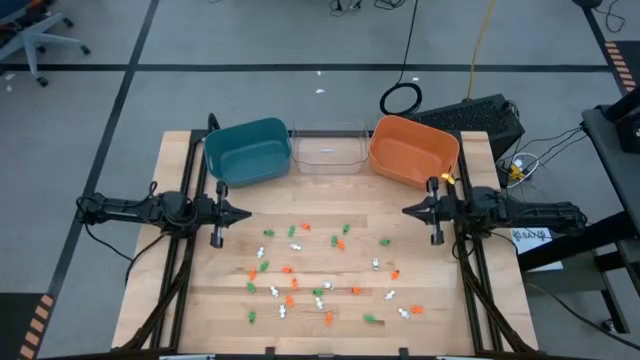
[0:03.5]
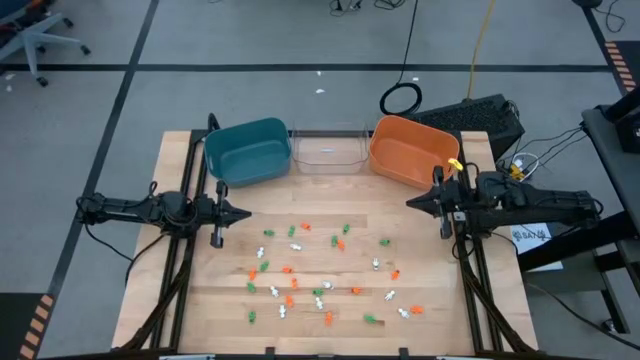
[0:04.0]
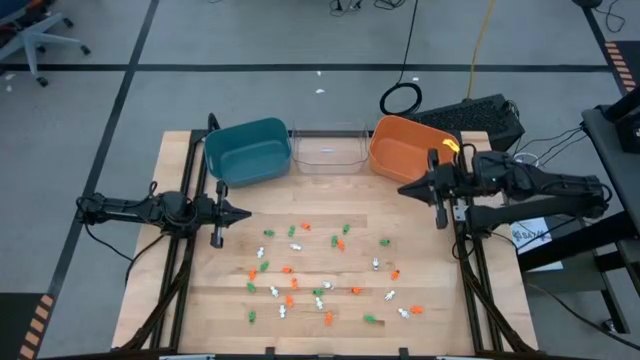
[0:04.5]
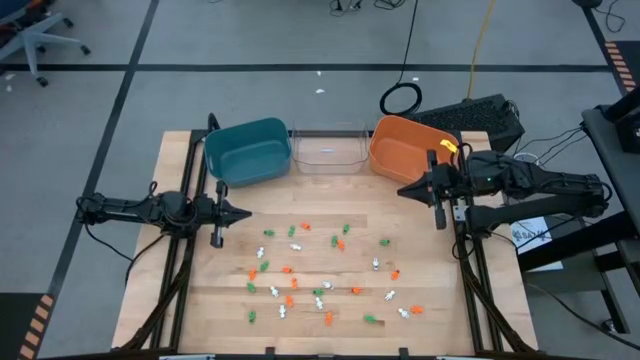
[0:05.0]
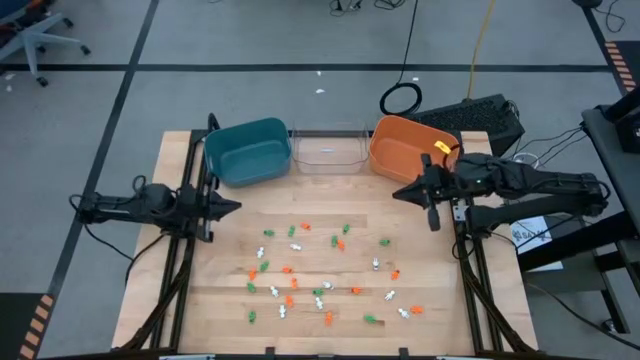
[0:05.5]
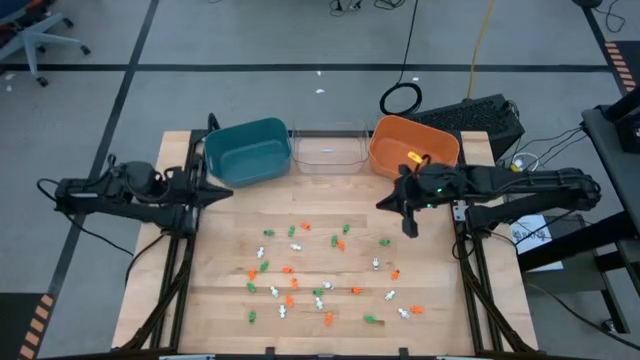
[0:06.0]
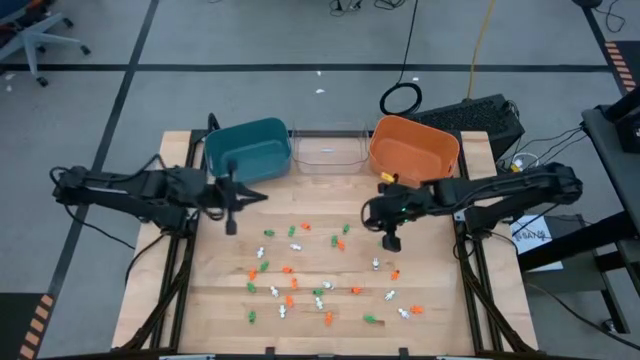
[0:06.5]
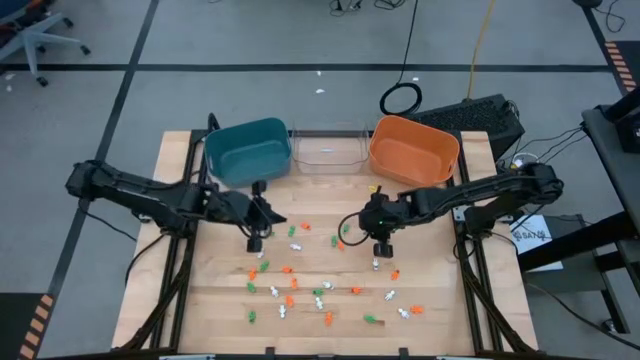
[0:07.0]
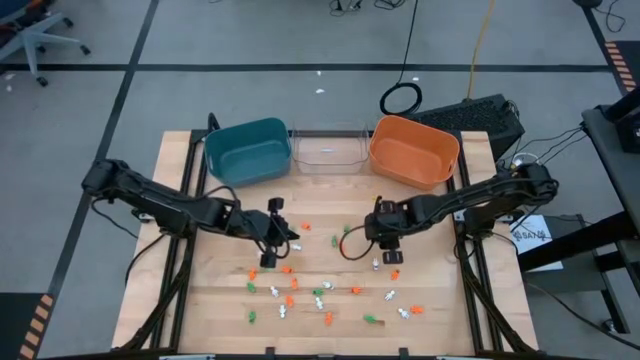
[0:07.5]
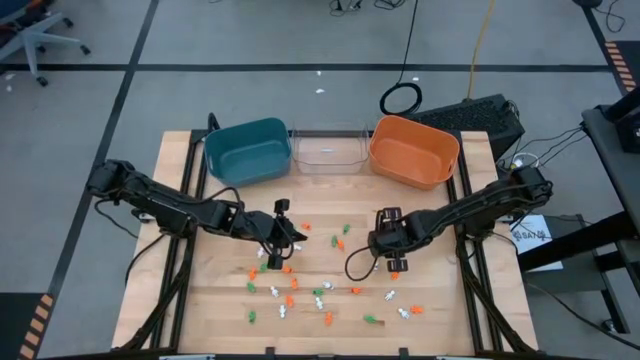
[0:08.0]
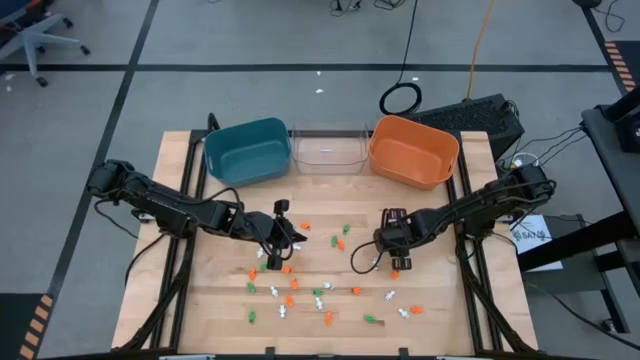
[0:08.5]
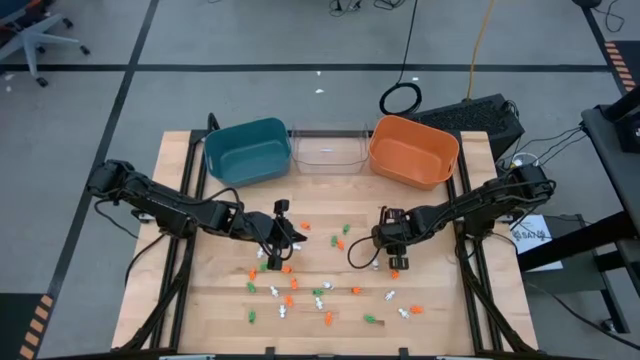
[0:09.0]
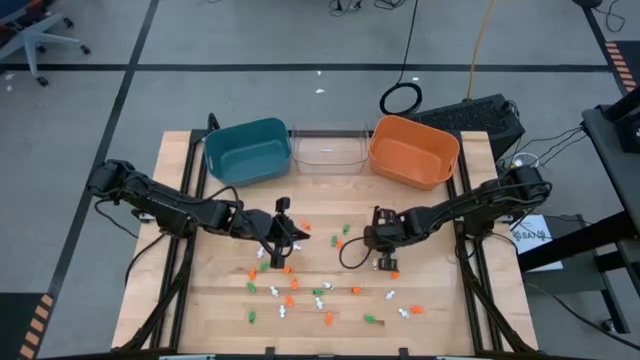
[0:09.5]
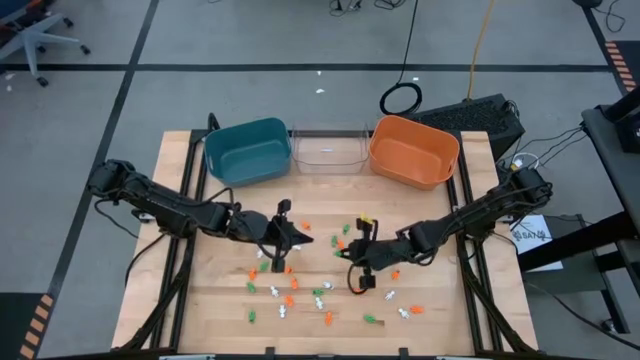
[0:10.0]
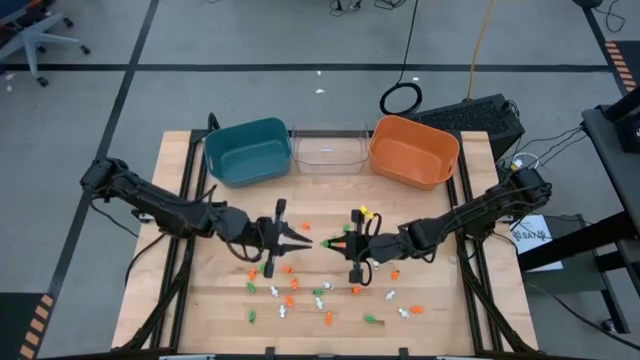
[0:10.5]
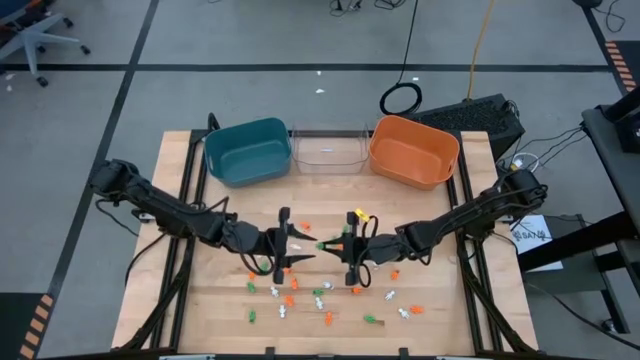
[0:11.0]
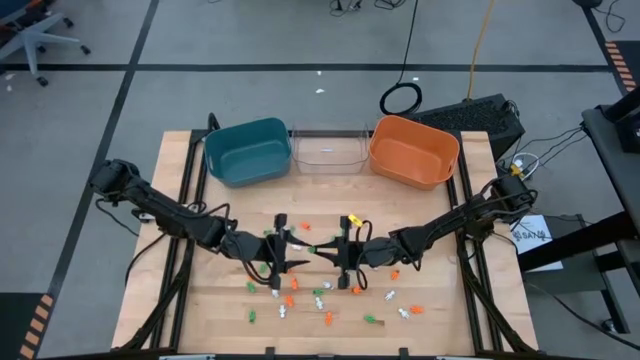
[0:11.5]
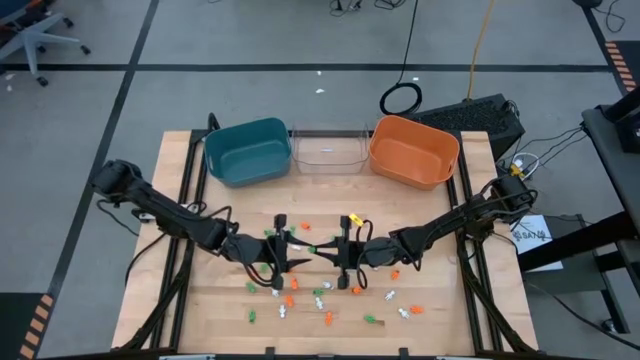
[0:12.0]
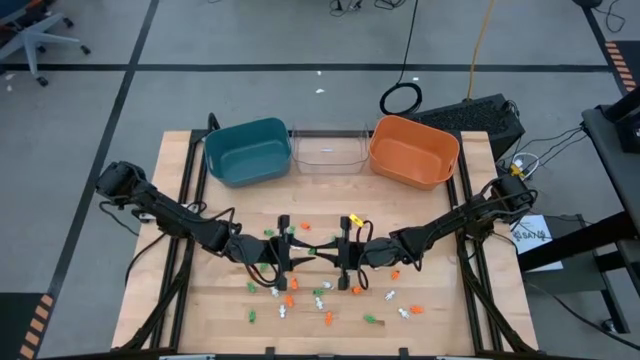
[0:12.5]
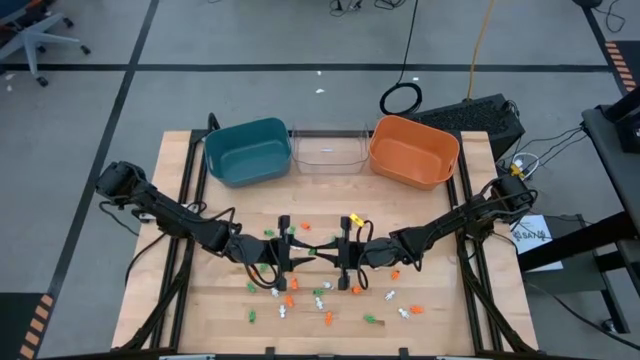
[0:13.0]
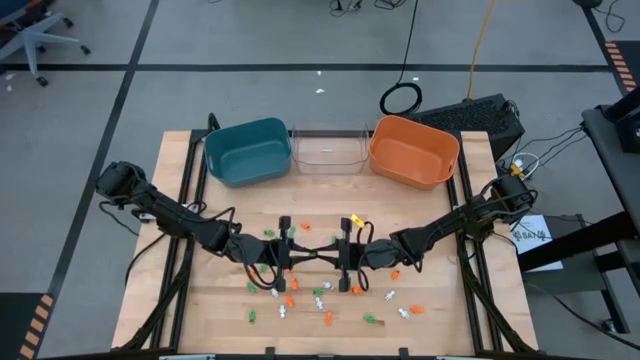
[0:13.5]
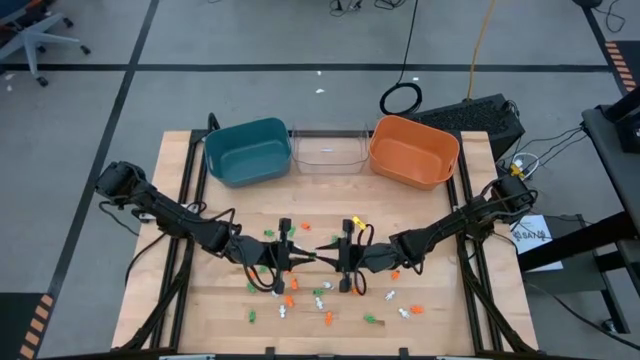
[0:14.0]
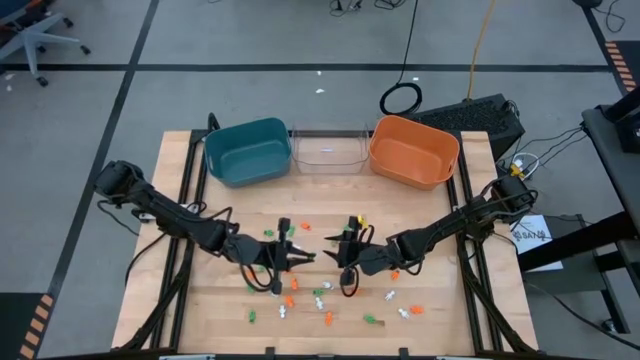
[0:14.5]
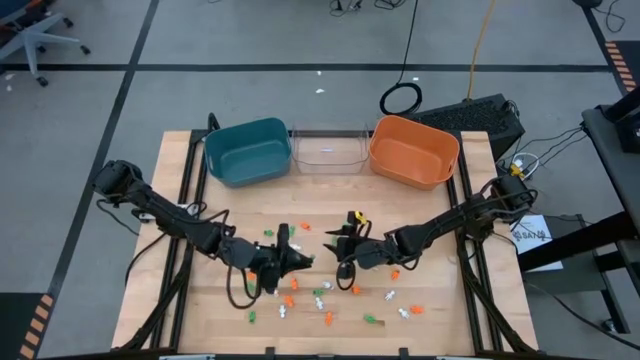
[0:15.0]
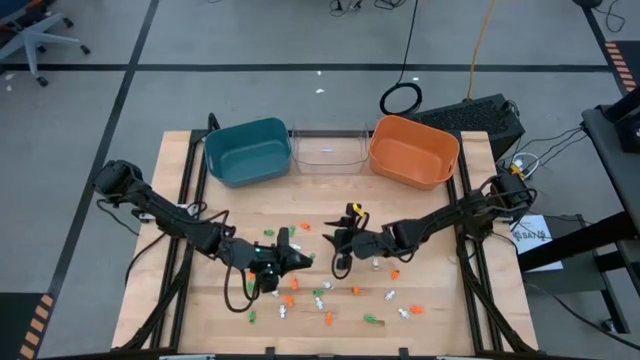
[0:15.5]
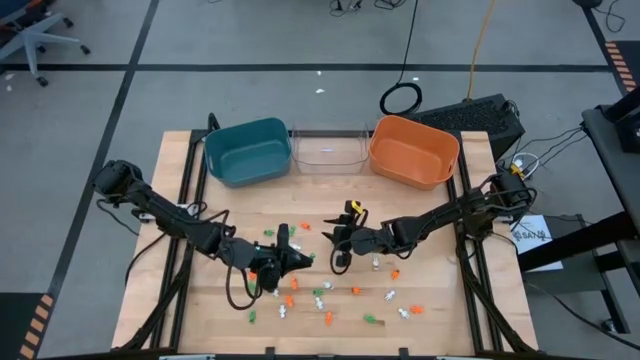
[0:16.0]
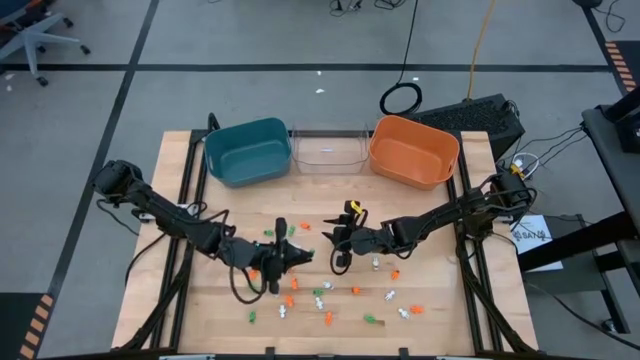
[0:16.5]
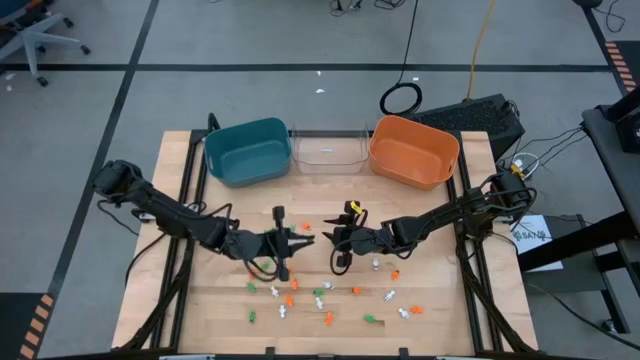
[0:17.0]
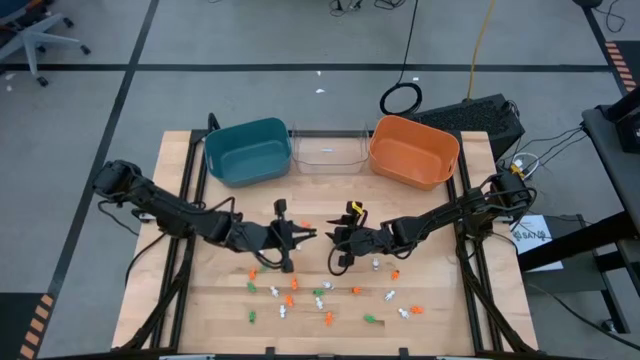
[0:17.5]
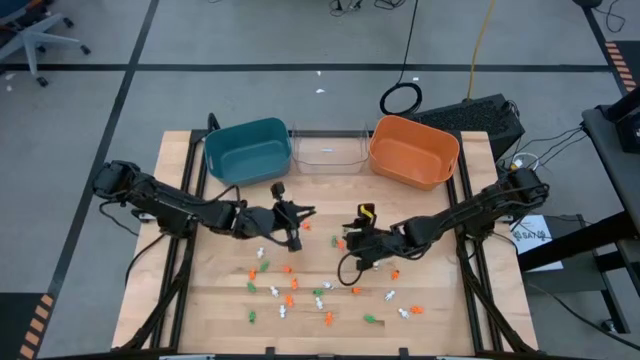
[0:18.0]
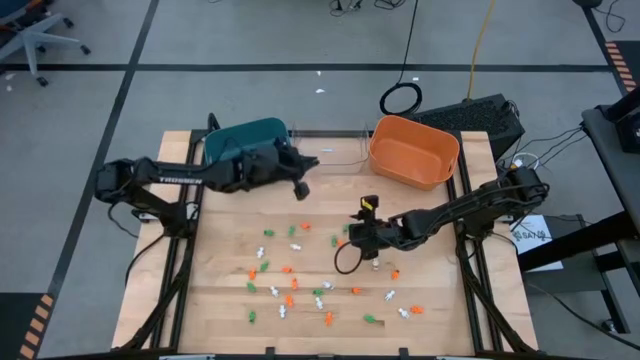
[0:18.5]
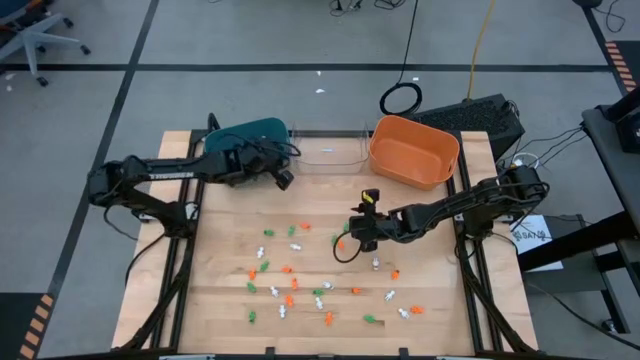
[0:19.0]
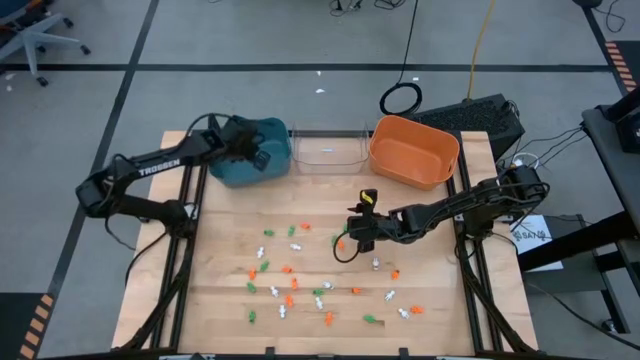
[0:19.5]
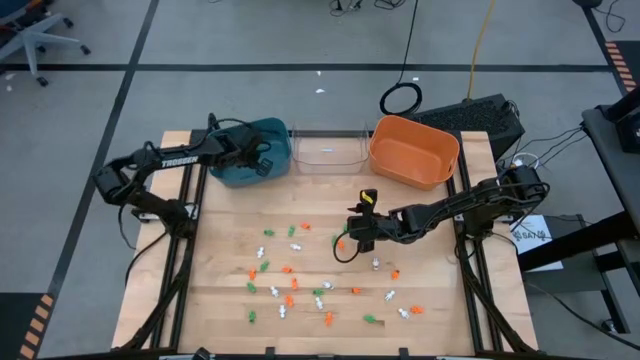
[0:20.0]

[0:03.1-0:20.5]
Task: Sort Halloween decoration
Put the green skeleton toy into the blue bin
